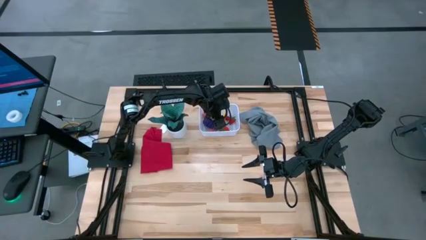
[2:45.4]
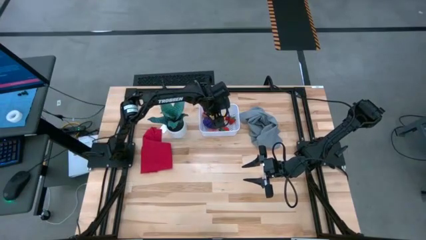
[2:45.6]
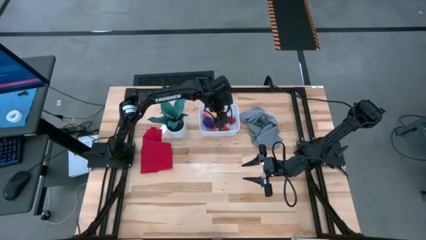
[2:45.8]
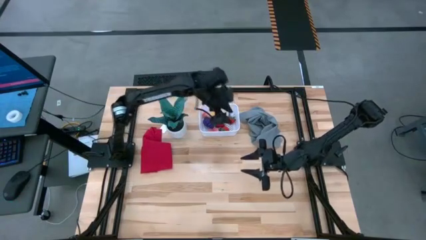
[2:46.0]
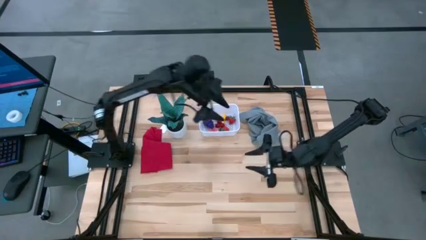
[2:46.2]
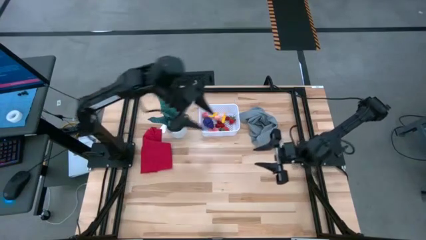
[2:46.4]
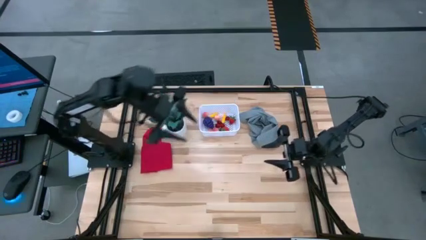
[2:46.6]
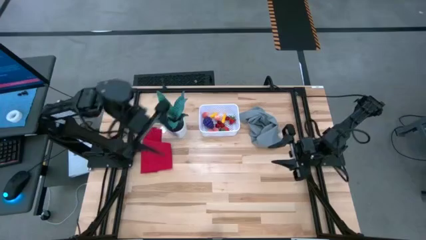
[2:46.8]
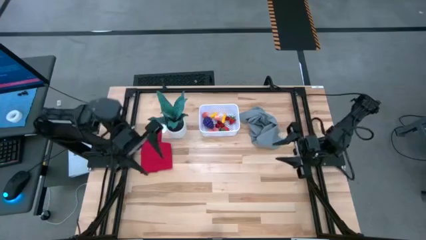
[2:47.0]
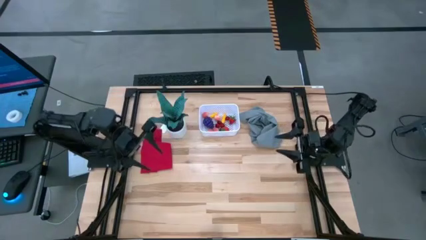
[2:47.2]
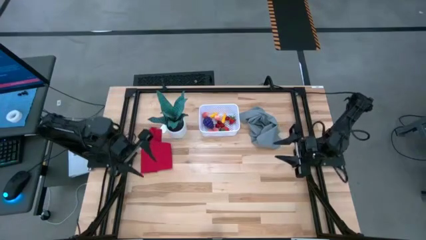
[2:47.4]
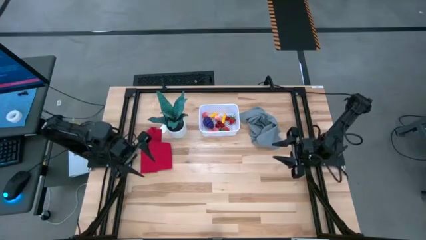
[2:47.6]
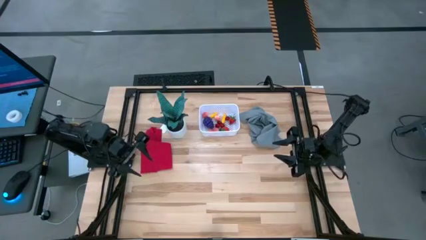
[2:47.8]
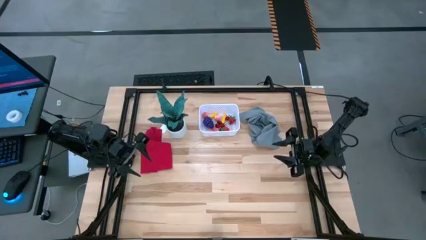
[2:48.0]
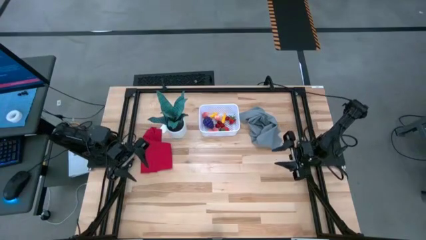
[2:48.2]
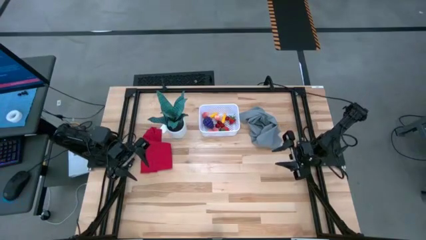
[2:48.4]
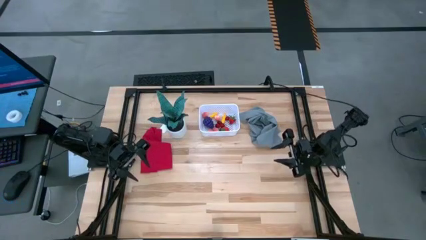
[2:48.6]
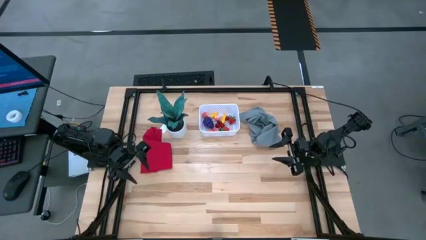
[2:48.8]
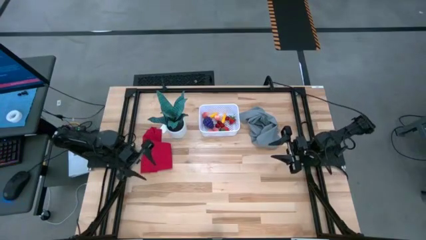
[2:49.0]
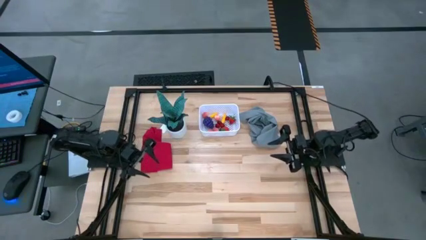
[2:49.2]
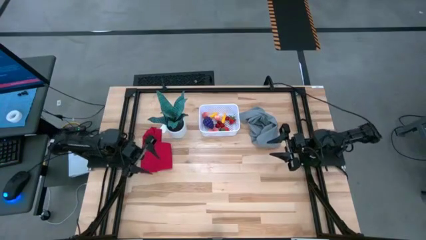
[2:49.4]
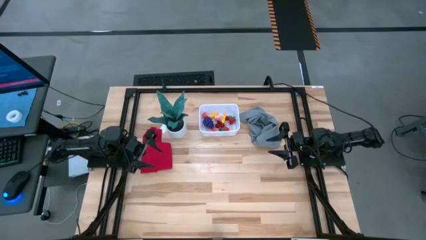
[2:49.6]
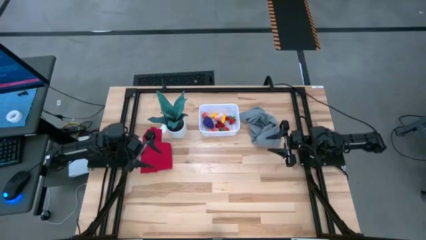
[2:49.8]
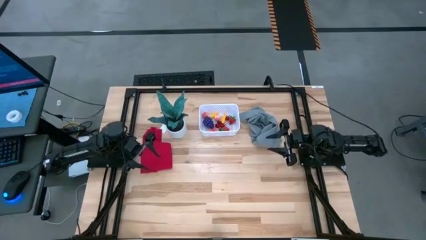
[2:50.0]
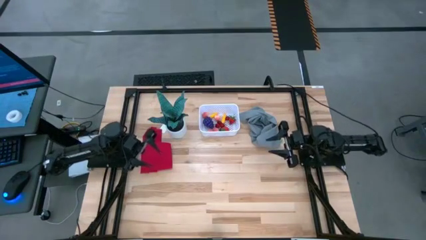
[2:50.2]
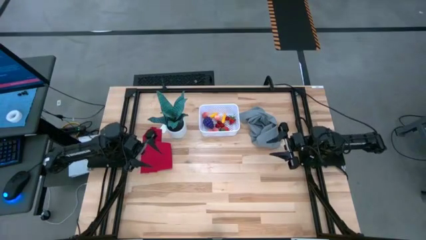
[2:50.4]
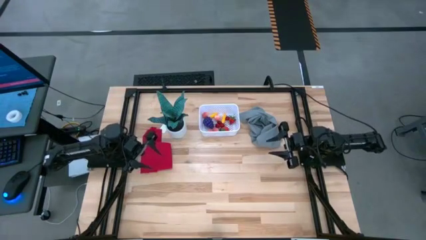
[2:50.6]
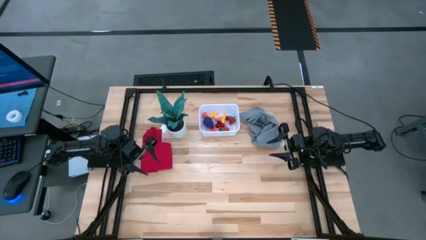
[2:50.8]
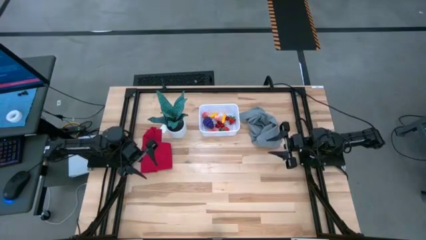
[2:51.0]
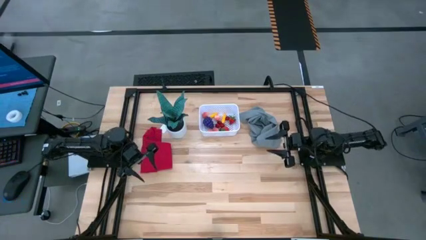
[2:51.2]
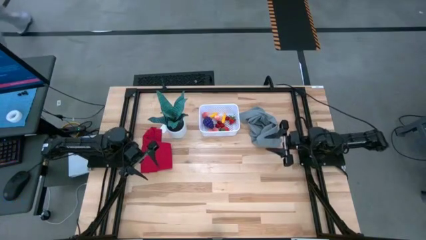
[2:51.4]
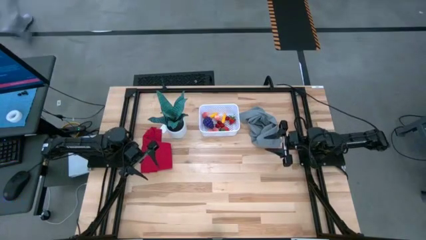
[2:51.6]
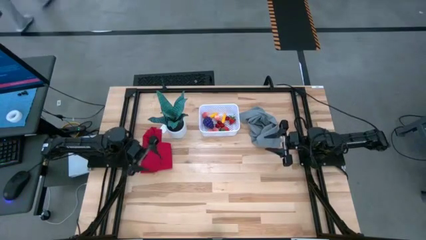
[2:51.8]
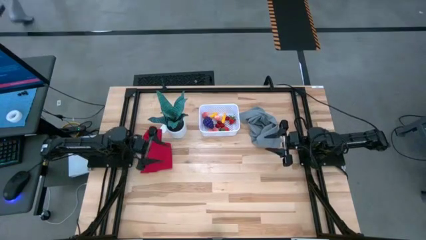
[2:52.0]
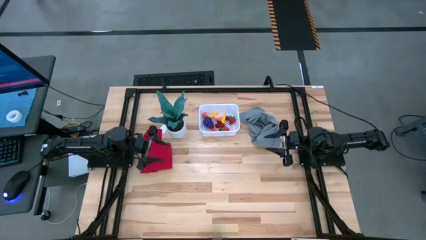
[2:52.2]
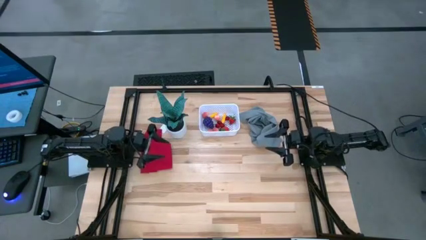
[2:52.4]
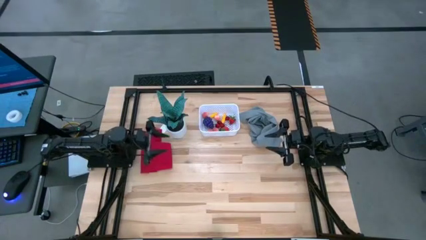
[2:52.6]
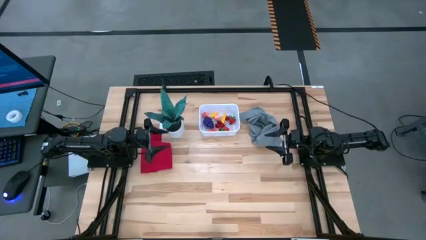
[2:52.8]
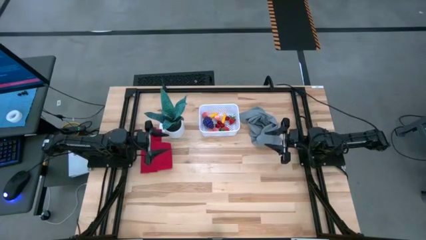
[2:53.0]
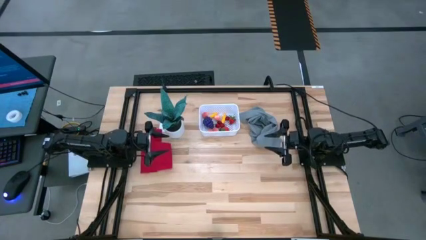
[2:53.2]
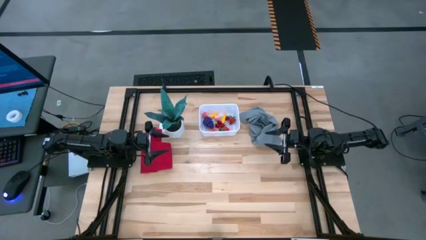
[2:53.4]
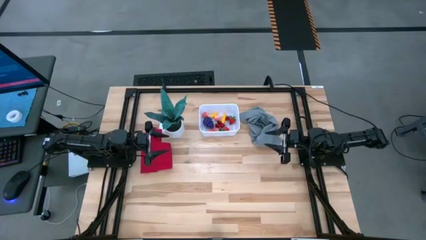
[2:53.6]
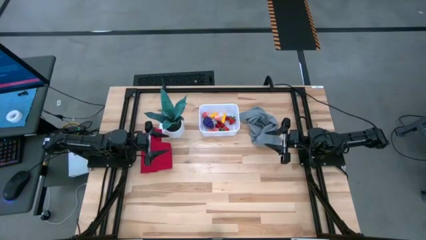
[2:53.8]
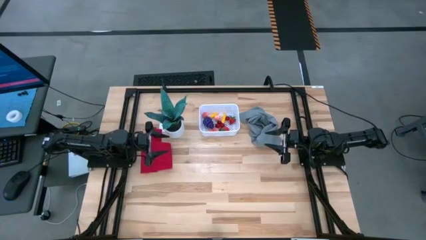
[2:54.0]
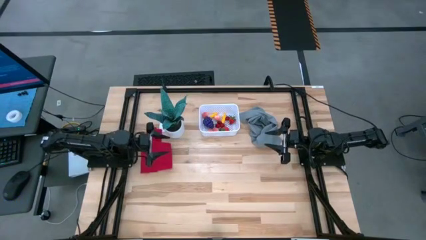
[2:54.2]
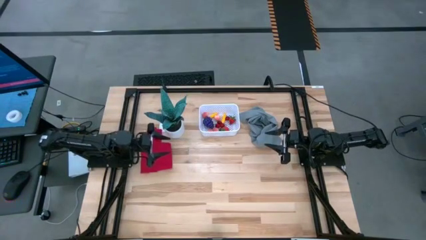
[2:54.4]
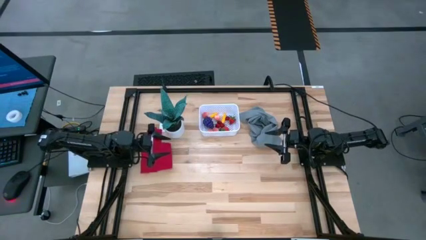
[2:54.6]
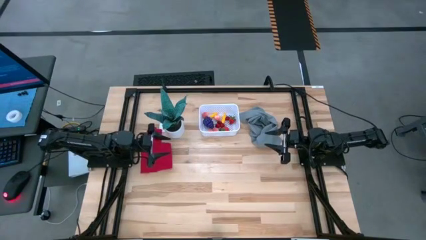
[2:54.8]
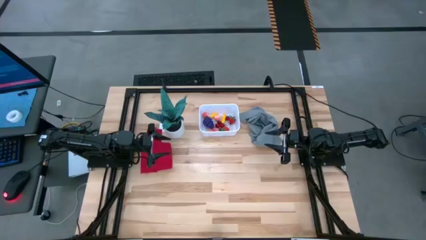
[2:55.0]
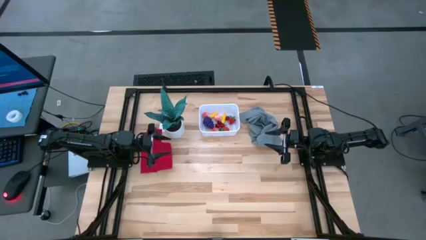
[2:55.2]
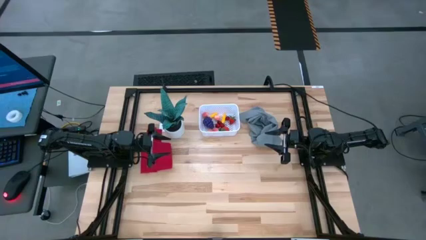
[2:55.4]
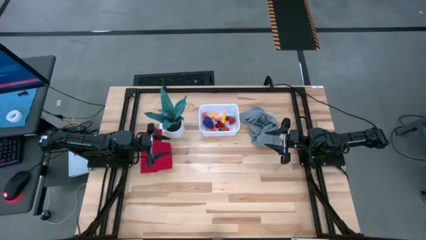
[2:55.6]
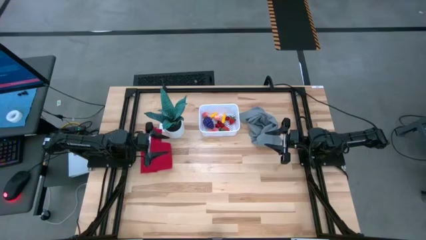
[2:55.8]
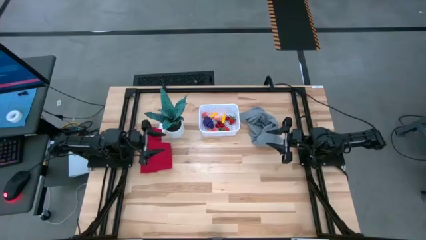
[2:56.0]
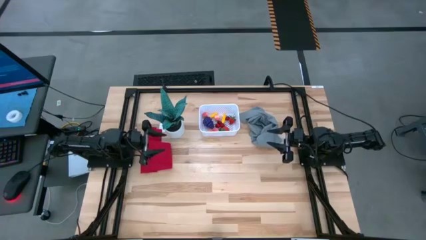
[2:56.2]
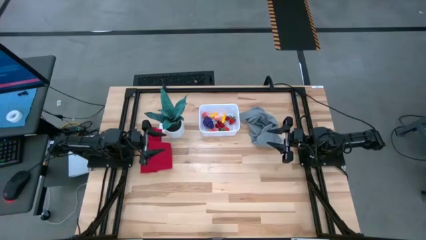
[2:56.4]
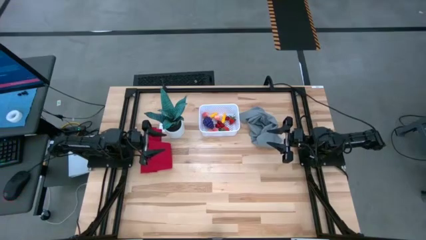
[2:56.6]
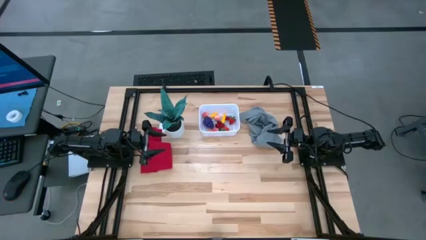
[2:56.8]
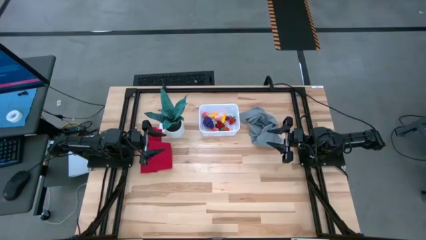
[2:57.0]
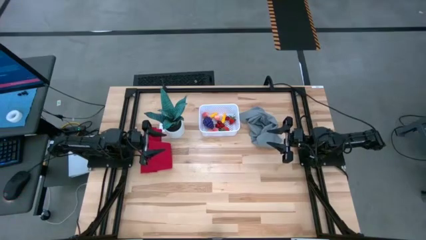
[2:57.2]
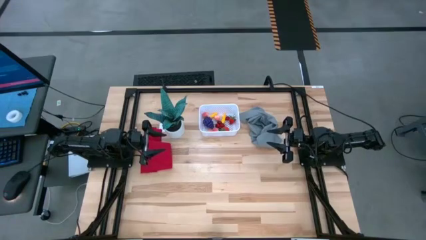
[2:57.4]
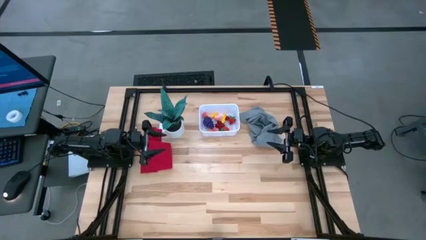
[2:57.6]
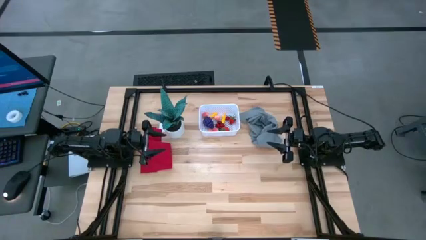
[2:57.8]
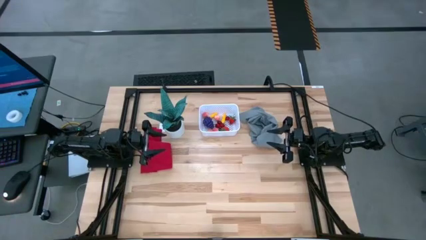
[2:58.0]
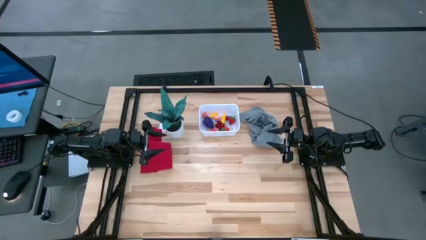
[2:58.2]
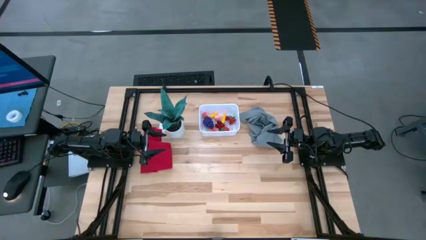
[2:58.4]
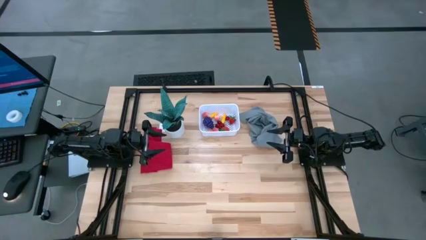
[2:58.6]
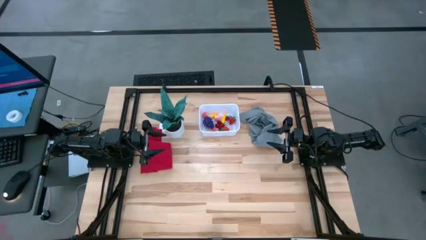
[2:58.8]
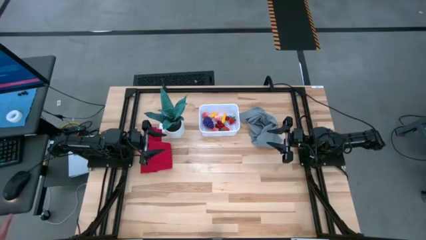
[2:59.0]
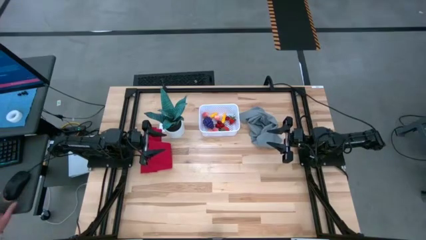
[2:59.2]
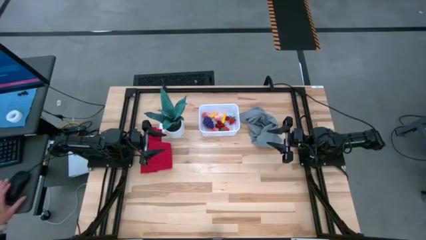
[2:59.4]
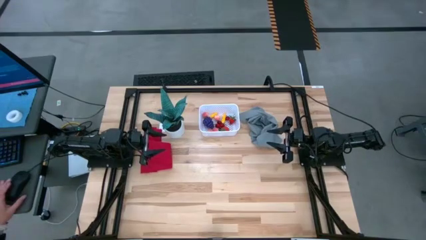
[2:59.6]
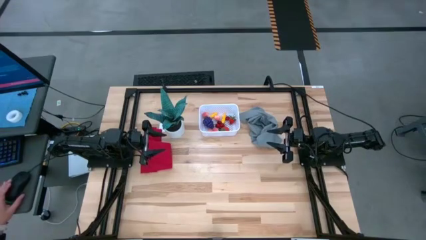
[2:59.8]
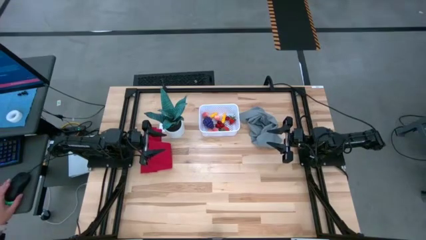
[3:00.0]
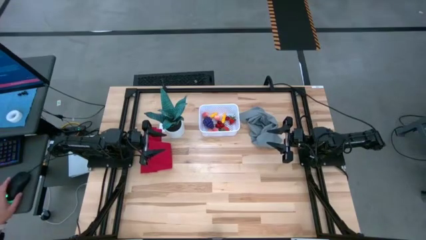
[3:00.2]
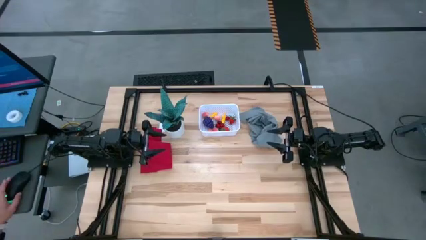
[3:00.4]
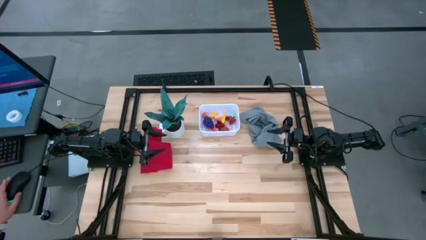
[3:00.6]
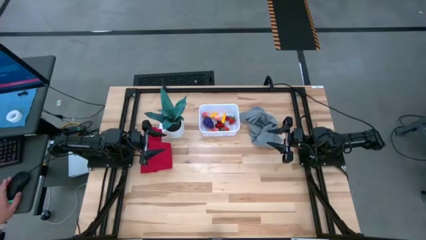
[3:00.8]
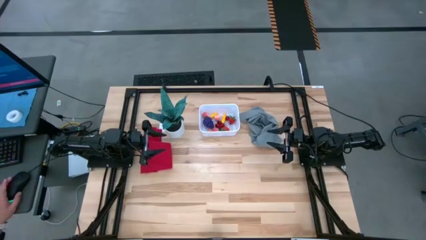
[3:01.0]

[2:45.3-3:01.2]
Task: Pick and placing Produce into tupperware
Return to Home Position

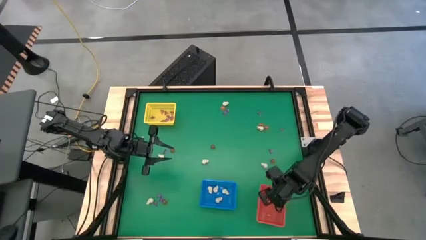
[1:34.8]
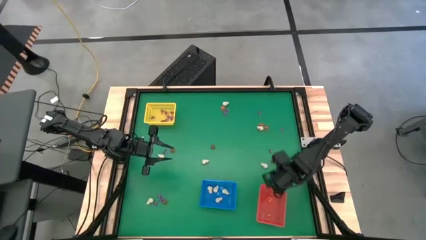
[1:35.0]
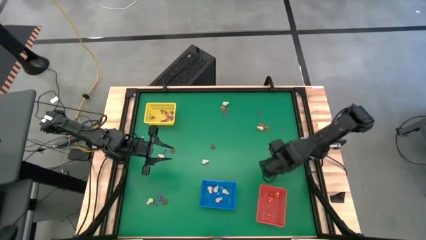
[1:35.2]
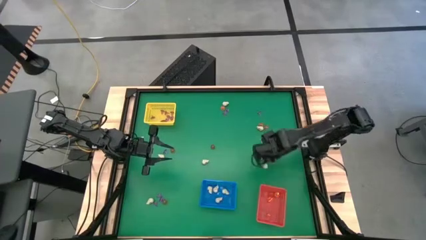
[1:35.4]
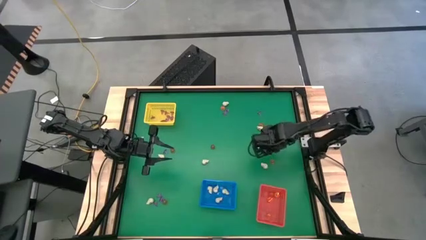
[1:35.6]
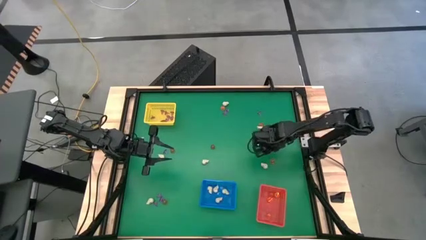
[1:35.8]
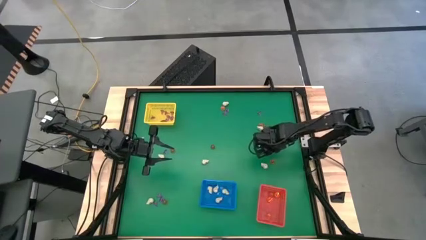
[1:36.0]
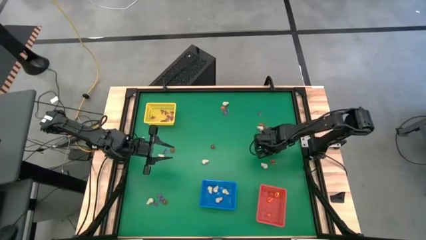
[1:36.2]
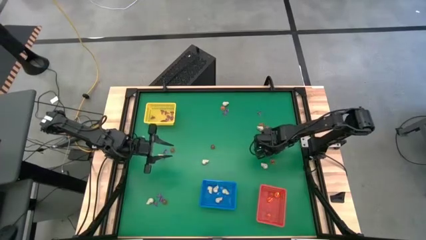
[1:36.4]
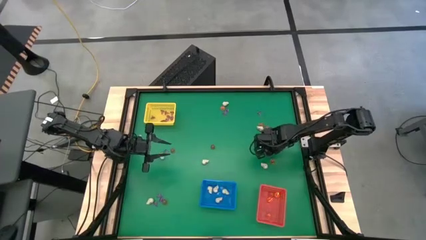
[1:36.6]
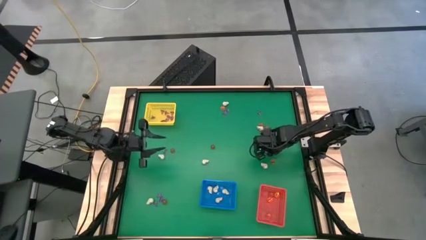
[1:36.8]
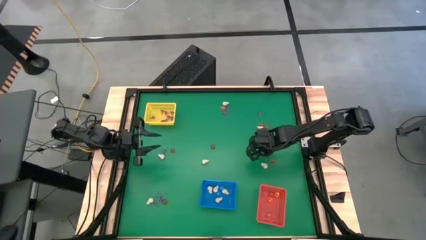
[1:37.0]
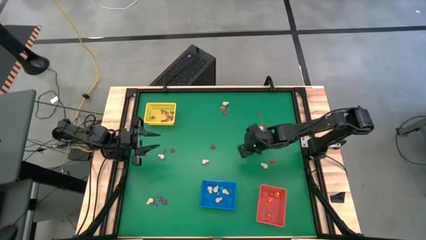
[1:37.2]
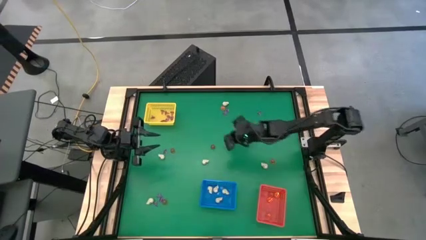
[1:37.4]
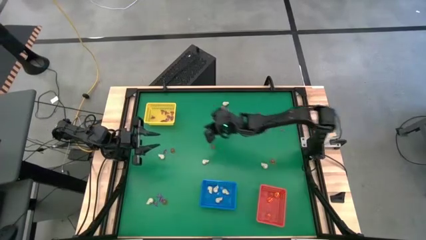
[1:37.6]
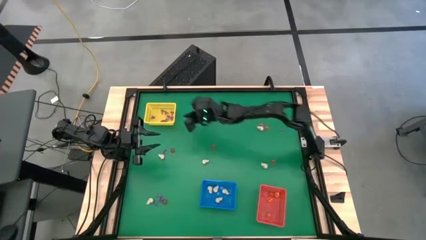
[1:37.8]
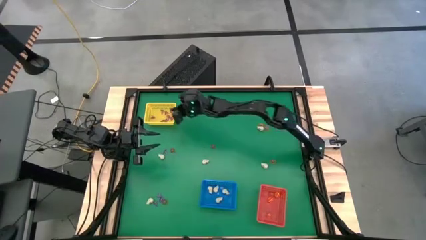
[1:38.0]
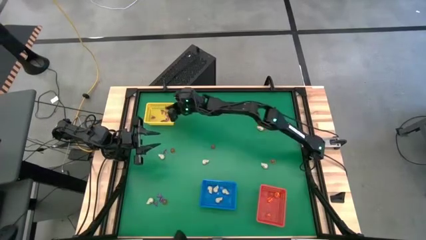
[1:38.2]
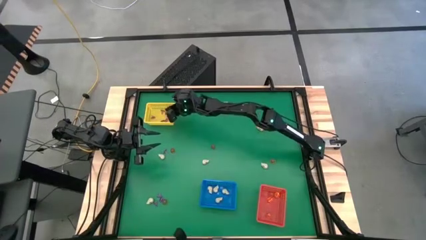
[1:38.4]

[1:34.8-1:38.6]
Task: Sort Halloween decoration
Put the purple witch hat toy into the yellow basket
